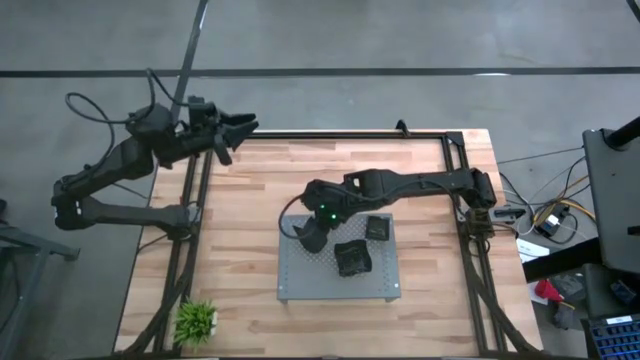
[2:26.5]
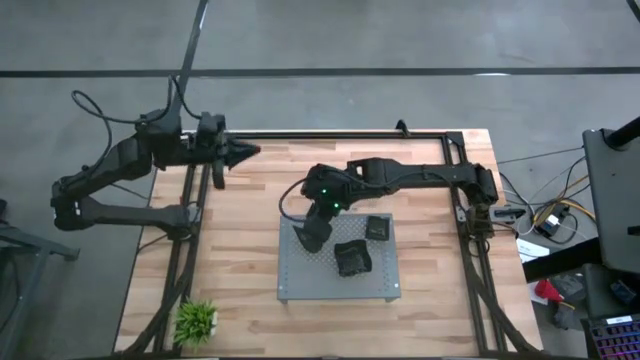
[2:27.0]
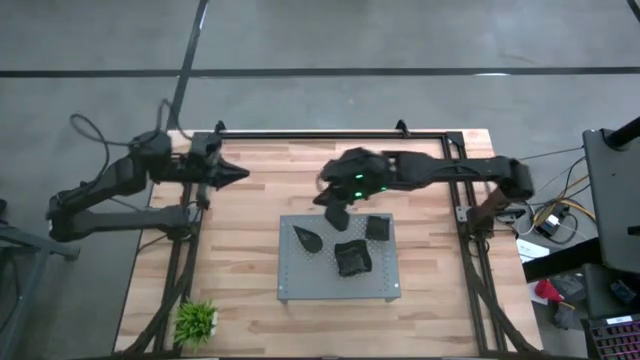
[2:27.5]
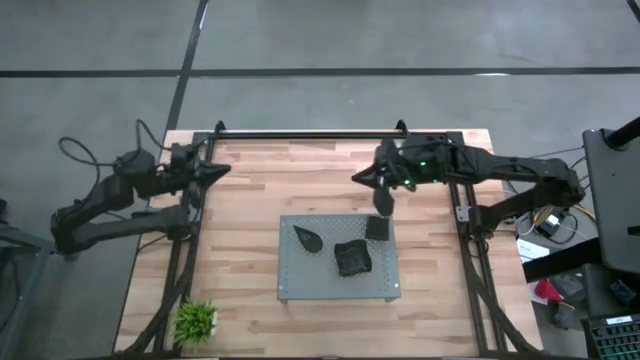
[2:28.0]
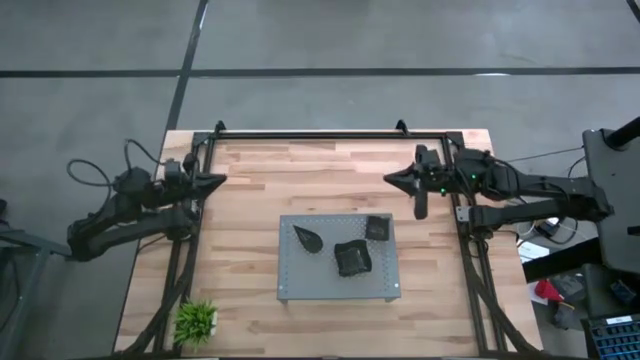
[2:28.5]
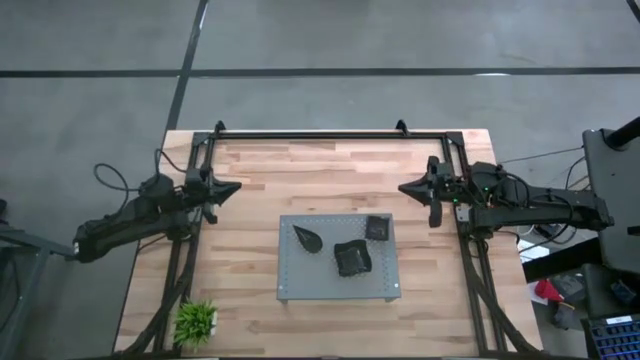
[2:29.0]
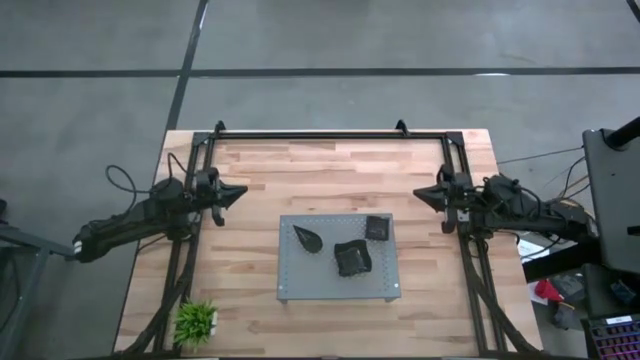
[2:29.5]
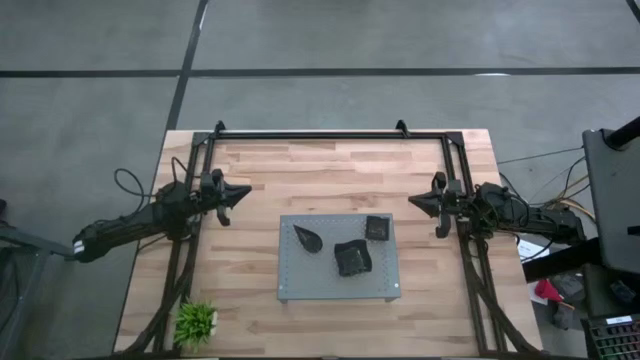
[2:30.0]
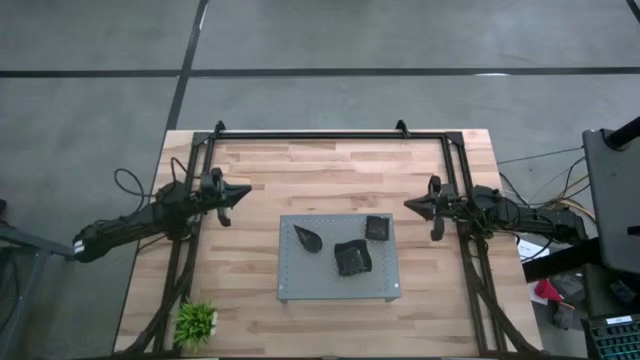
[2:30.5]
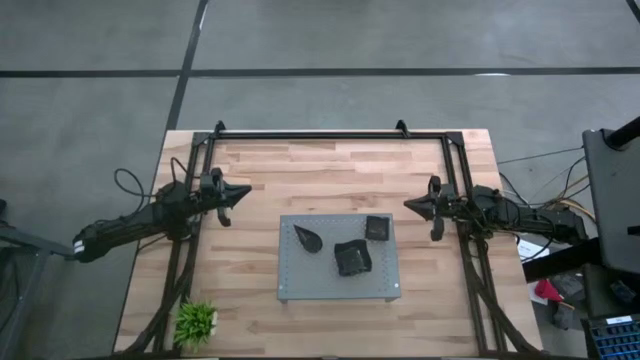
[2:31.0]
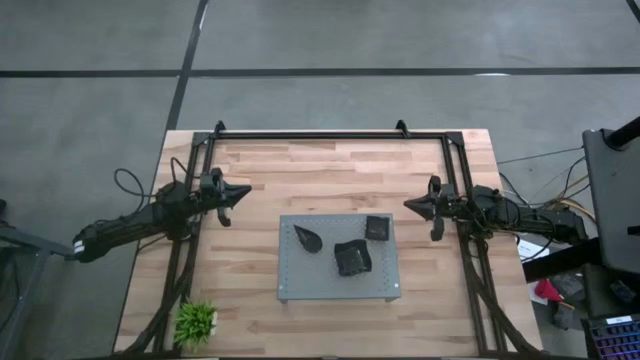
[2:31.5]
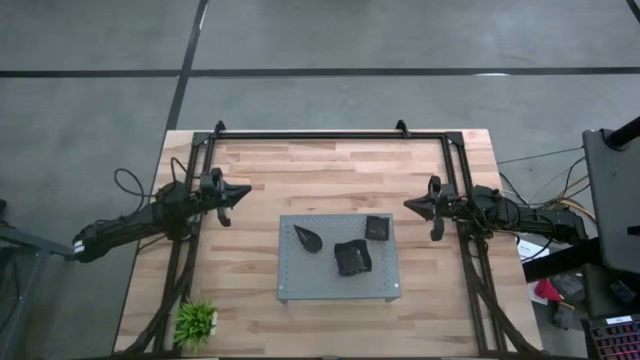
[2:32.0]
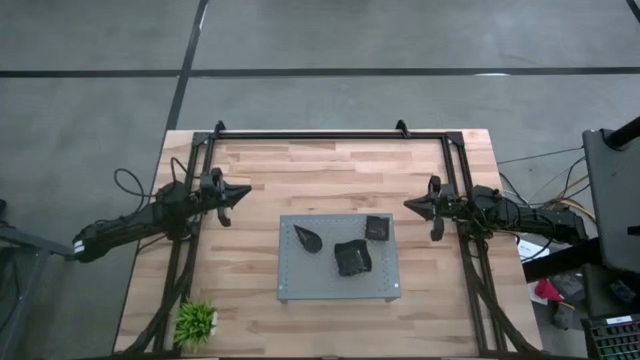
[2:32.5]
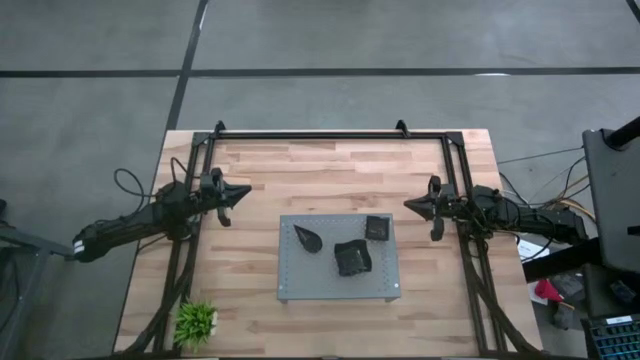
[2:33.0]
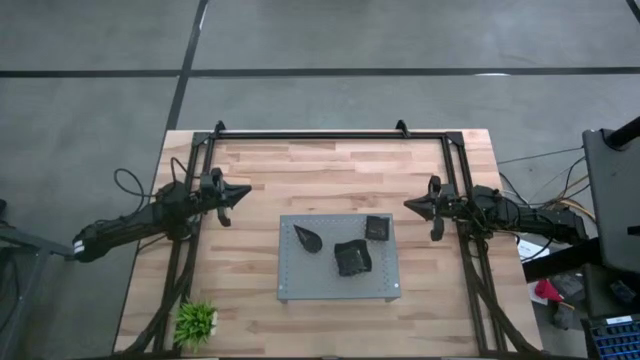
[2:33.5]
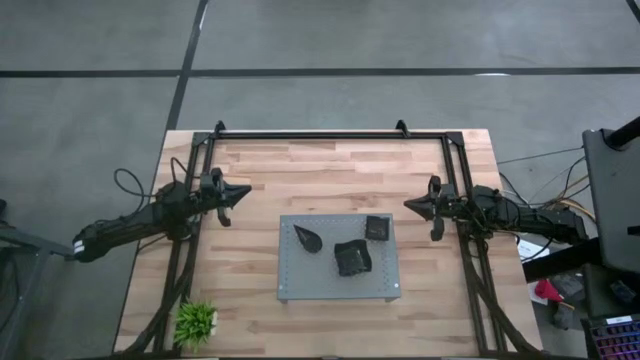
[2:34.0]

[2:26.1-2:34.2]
Task: Pick & Place Mini shaped plates
Return to Home Position

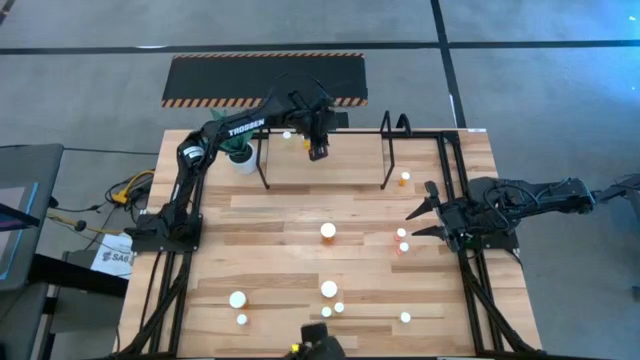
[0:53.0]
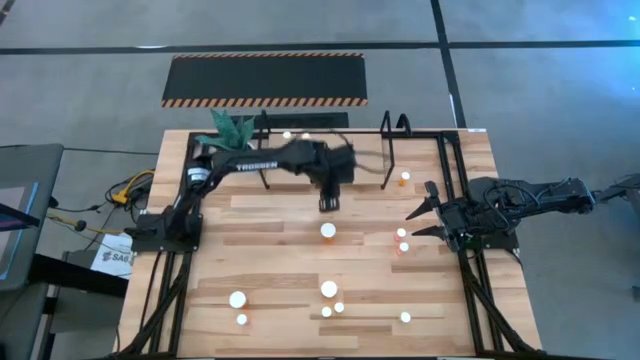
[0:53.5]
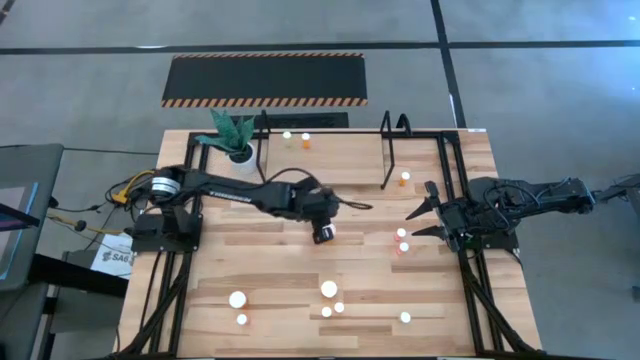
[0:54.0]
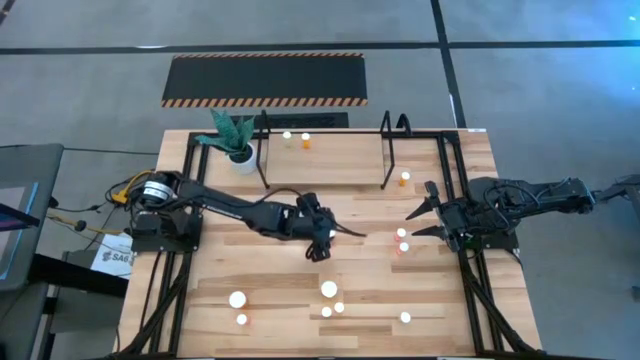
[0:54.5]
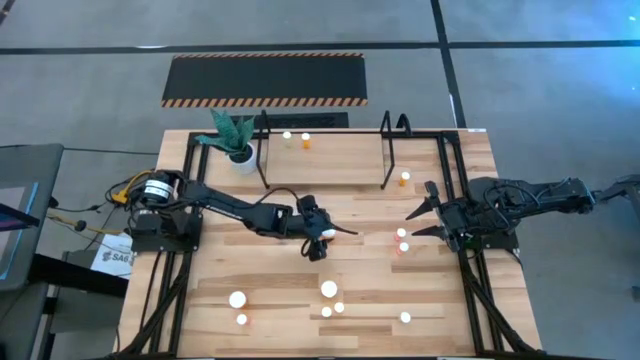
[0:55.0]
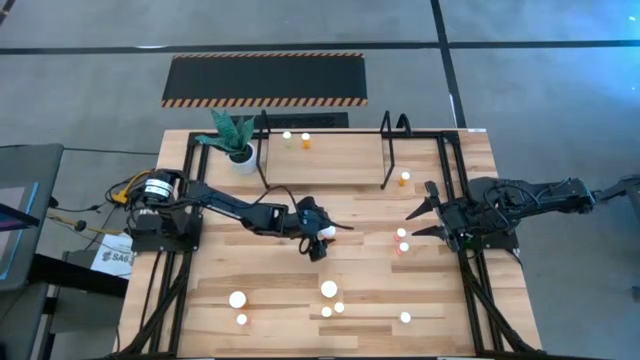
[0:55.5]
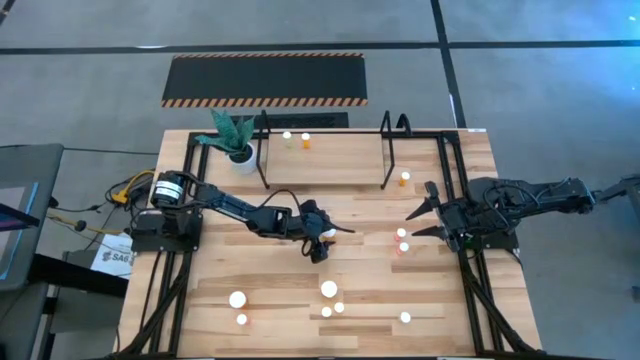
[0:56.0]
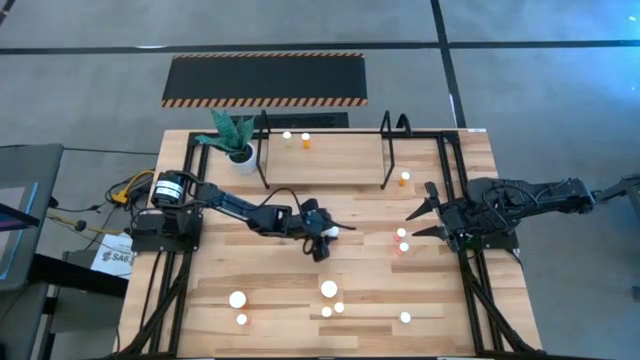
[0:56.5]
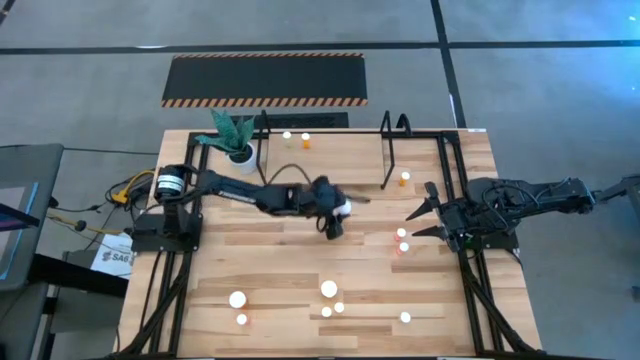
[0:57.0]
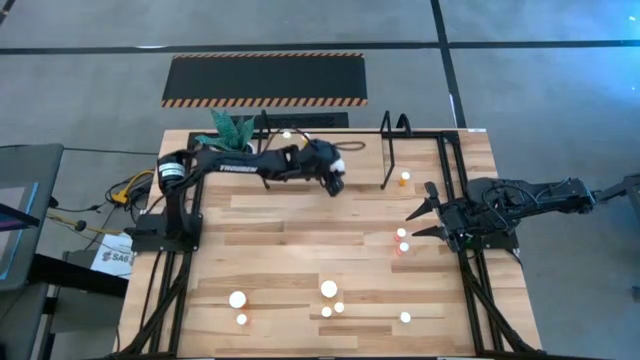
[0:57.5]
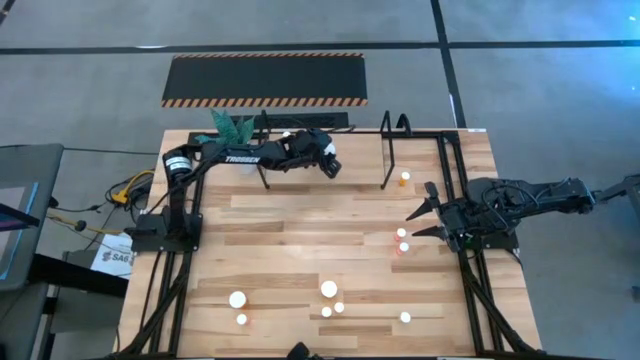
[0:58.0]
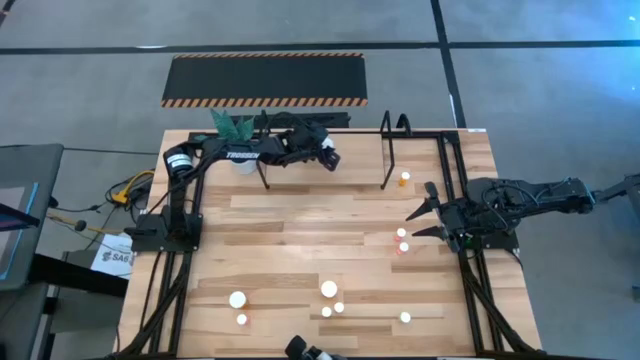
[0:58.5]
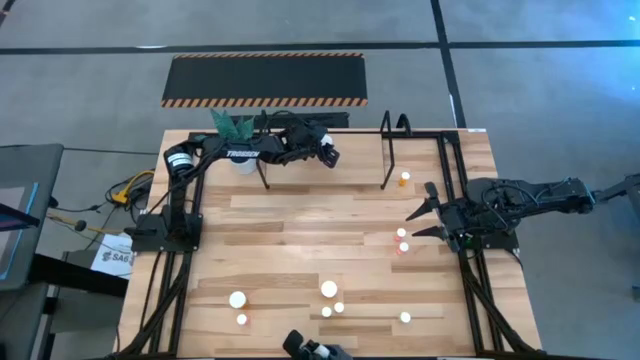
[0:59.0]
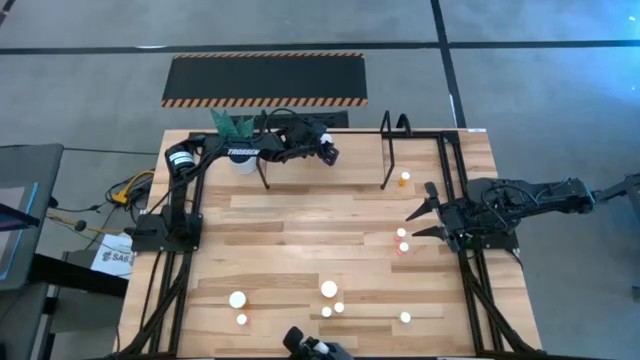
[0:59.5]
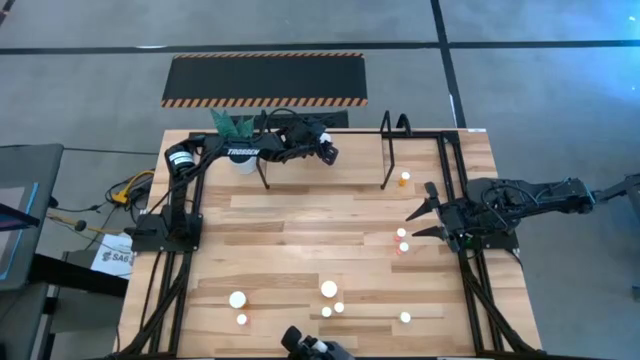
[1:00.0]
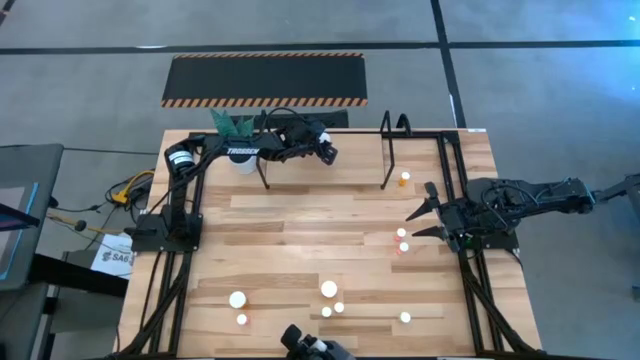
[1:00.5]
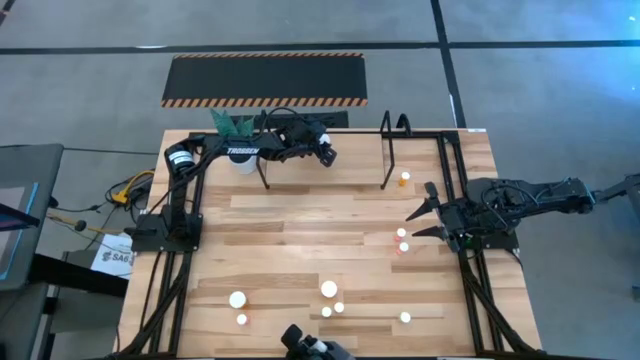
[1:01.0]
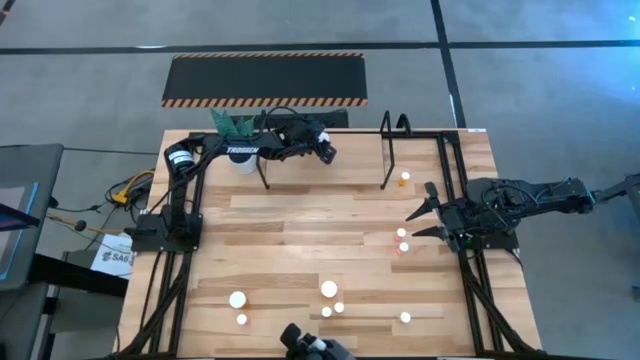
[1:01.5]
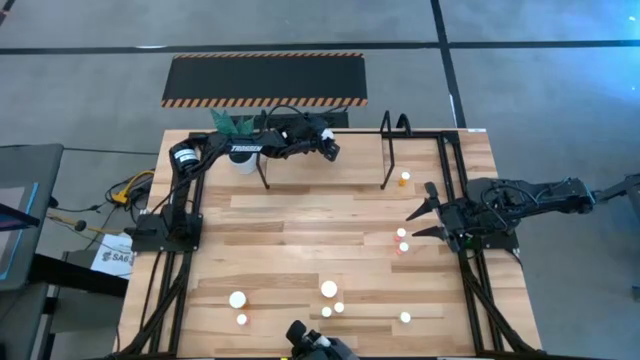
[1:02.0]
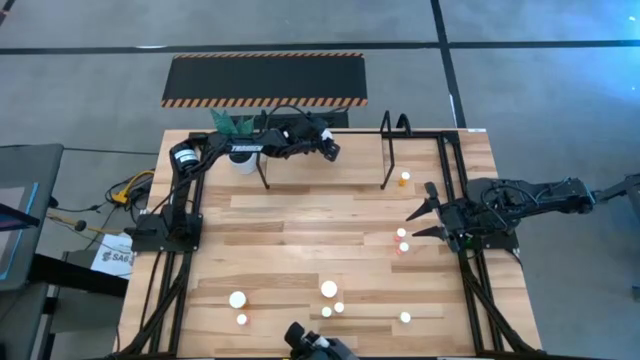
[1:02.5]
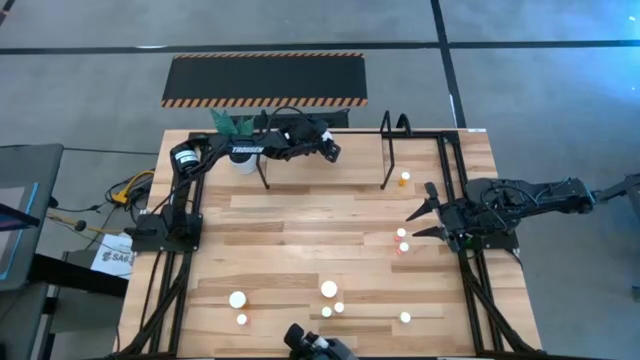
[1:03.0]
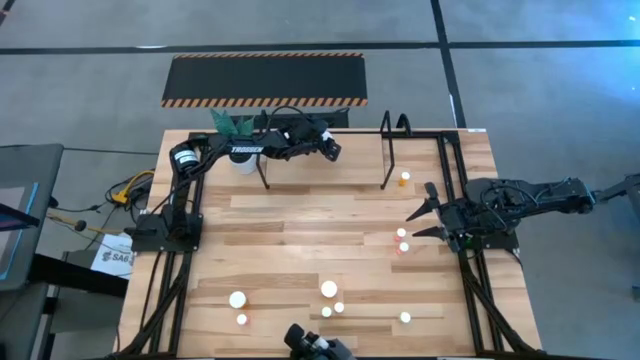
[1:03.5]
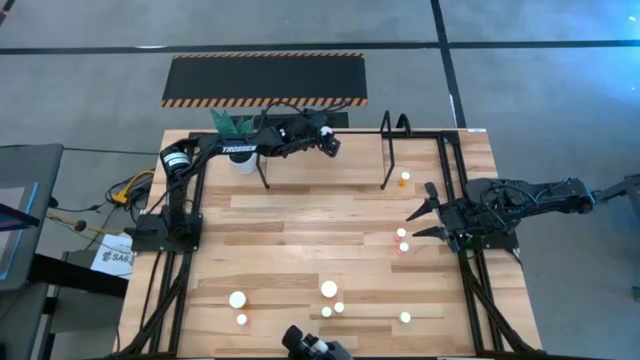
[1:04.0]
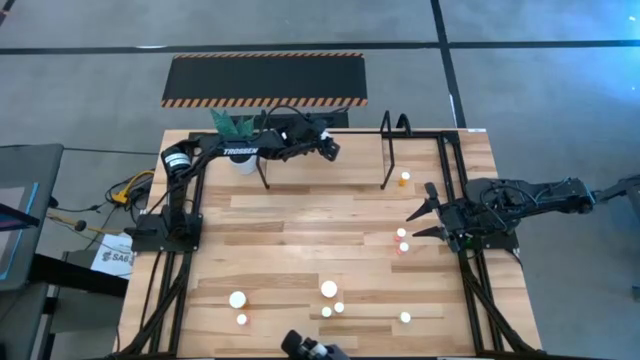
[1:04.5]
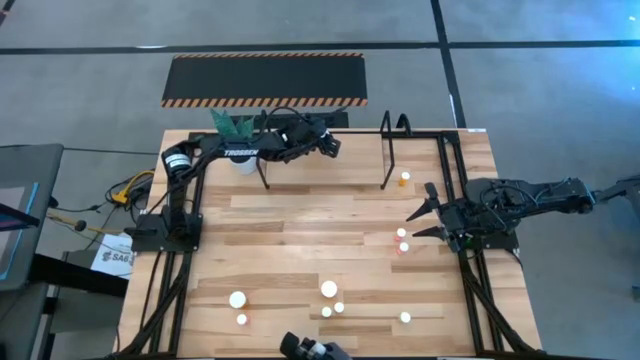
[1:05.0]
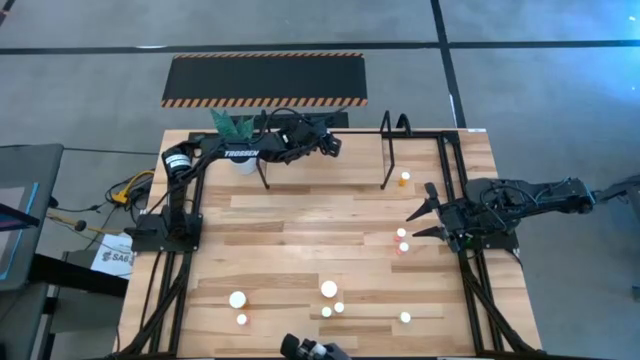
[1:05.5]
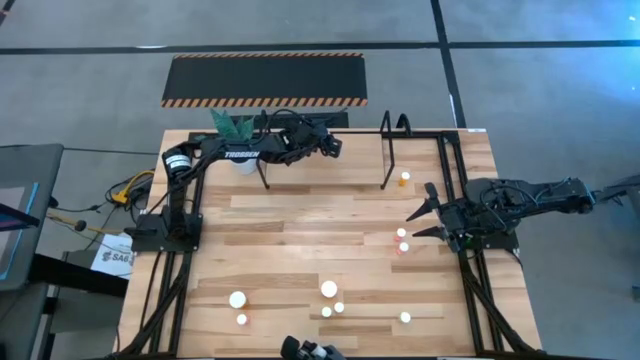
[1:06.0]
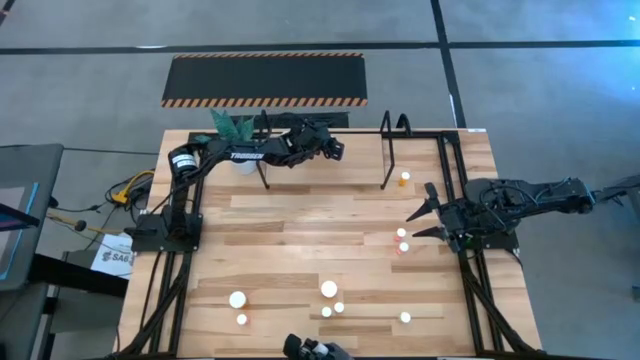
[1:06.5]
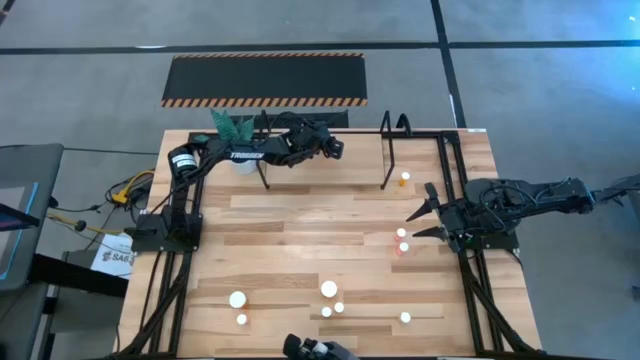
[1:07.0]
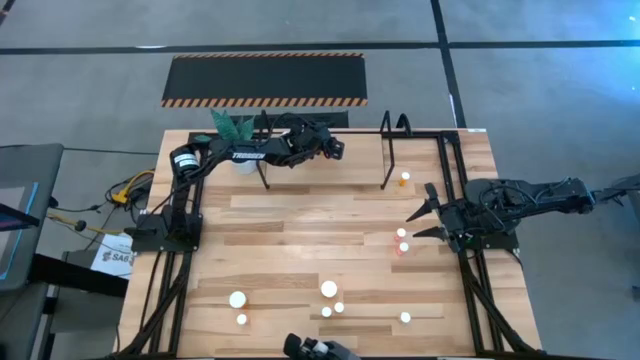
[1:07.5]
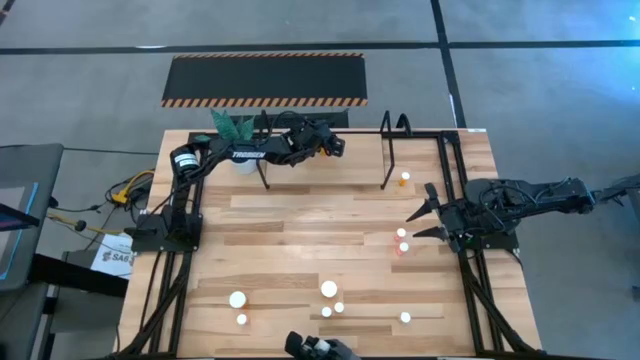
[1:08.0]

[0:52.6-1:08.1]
Task: Pick and place medicine bottles onto shelf by color
Put the top right big orange pill bottle on the shelf
